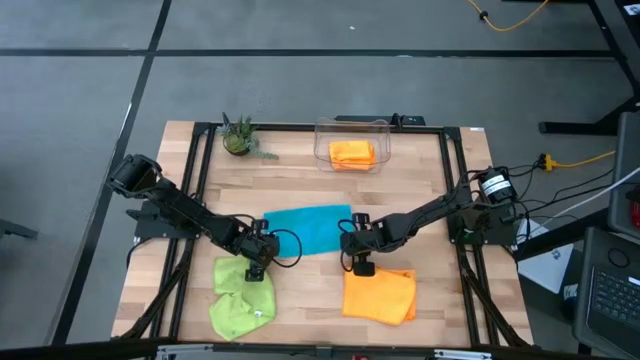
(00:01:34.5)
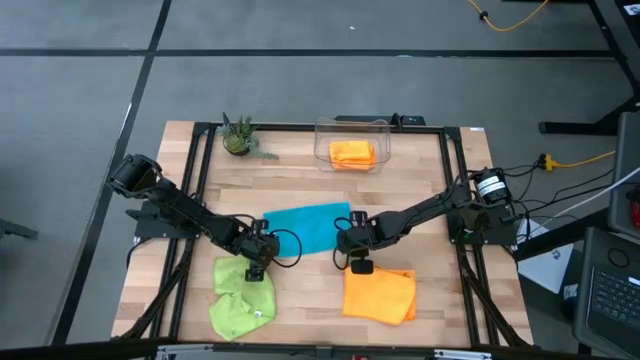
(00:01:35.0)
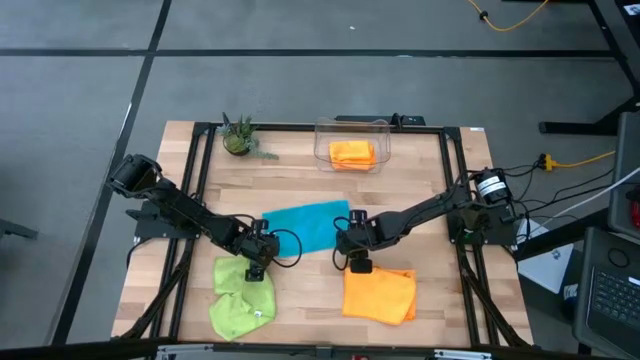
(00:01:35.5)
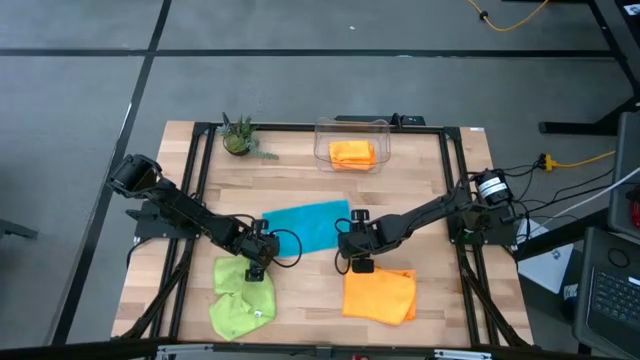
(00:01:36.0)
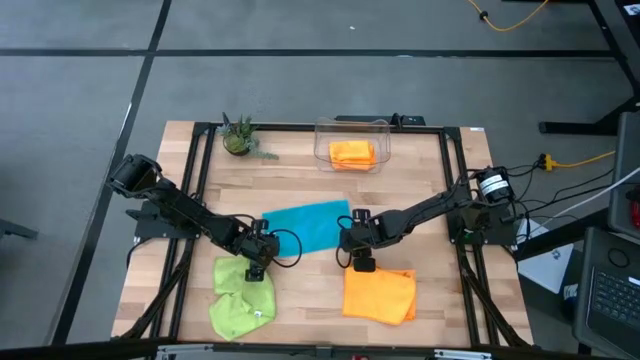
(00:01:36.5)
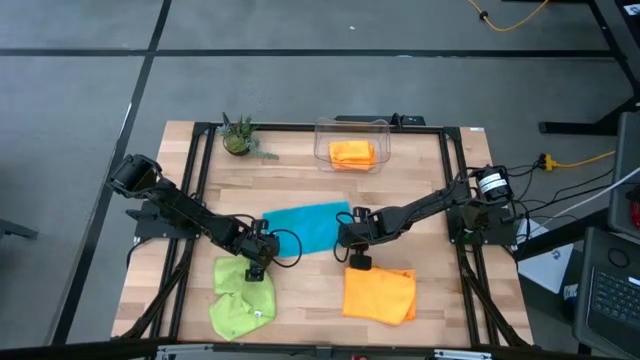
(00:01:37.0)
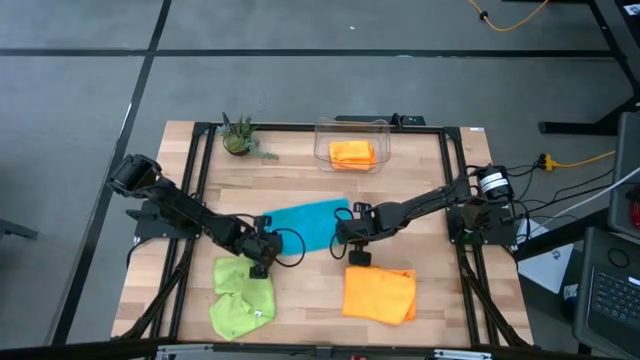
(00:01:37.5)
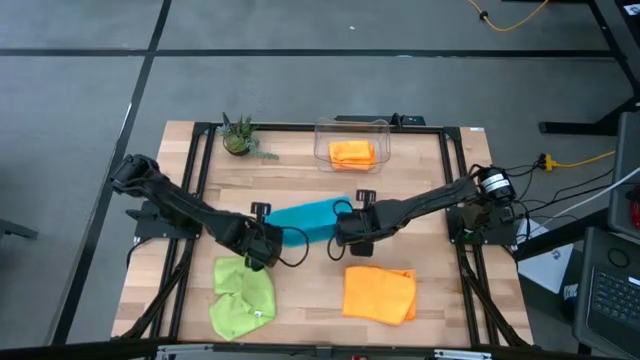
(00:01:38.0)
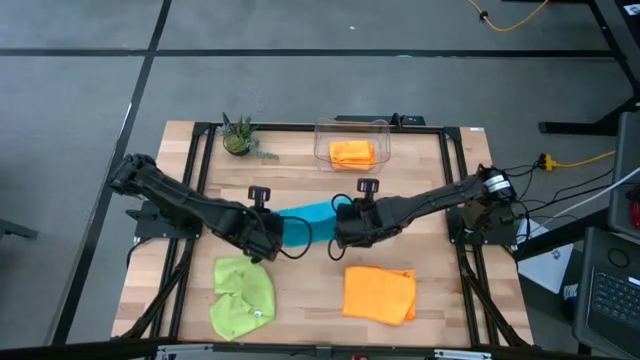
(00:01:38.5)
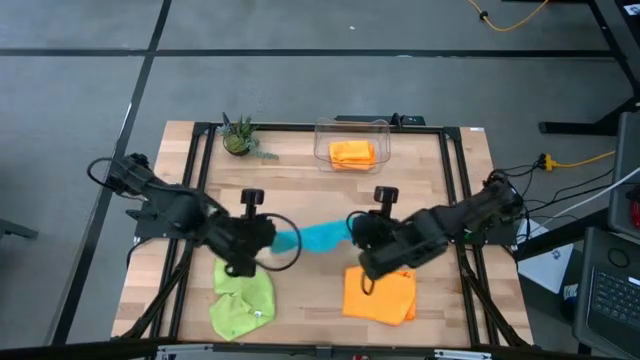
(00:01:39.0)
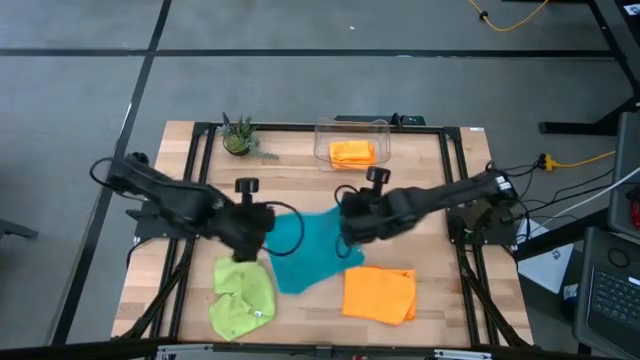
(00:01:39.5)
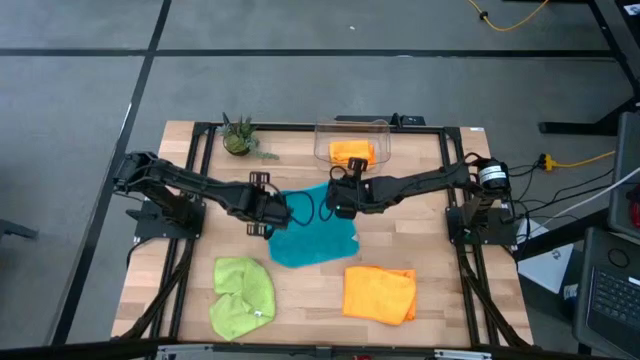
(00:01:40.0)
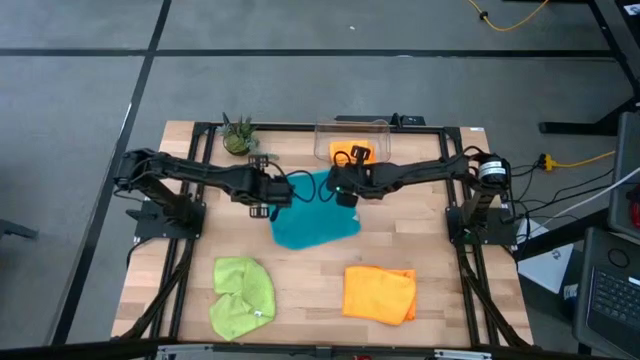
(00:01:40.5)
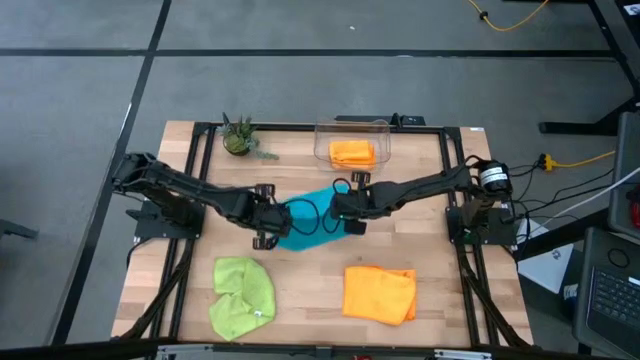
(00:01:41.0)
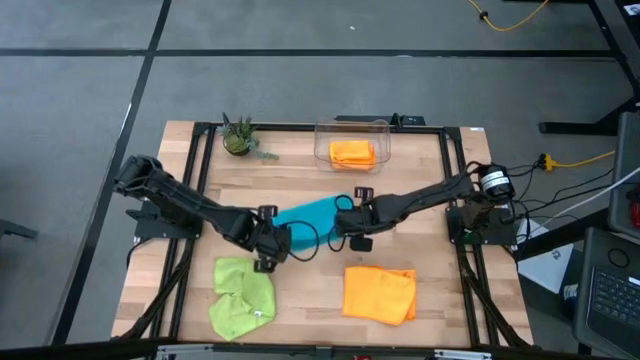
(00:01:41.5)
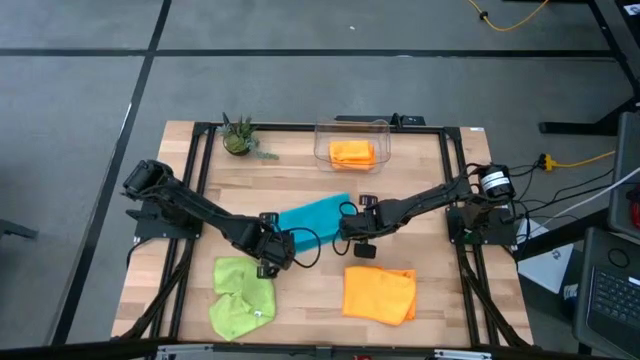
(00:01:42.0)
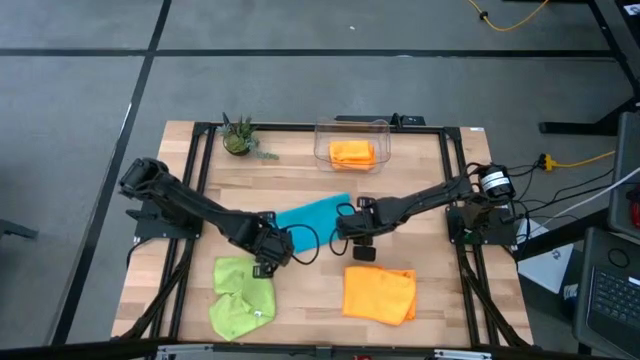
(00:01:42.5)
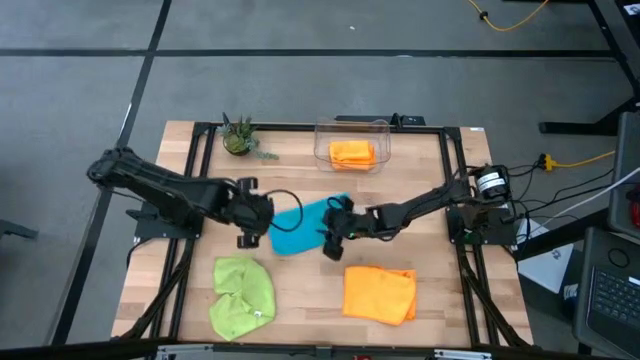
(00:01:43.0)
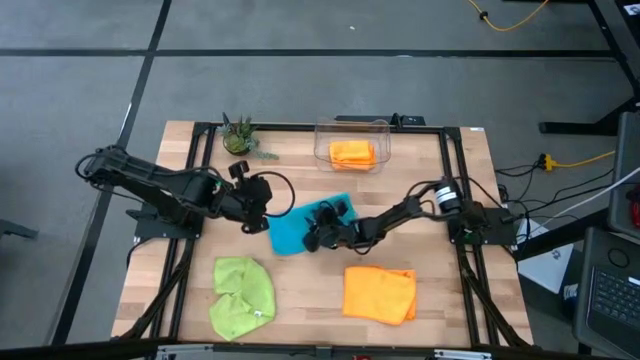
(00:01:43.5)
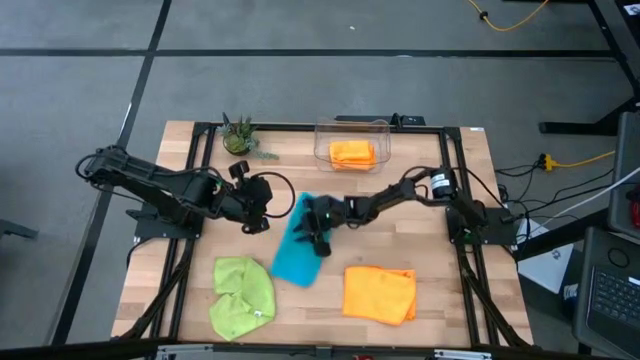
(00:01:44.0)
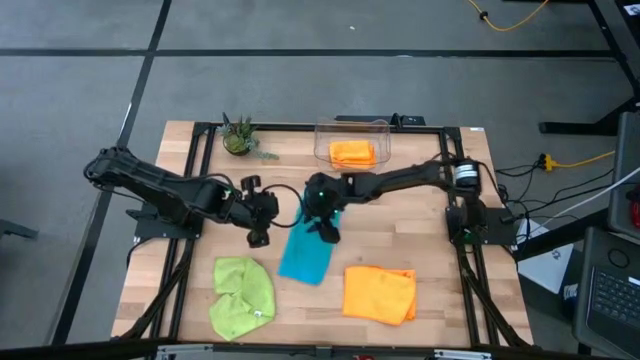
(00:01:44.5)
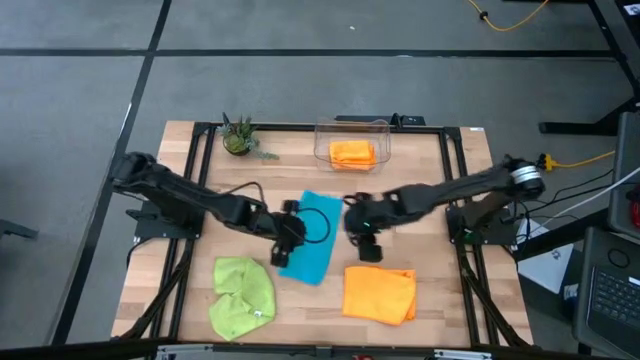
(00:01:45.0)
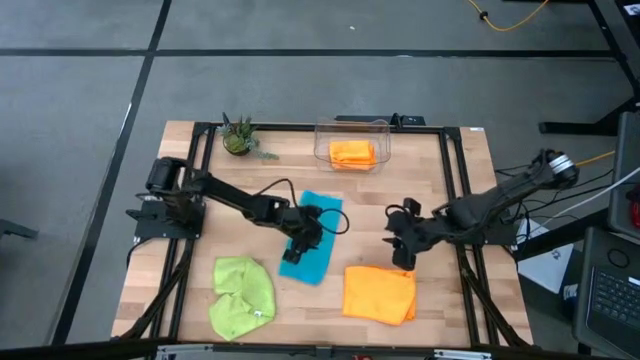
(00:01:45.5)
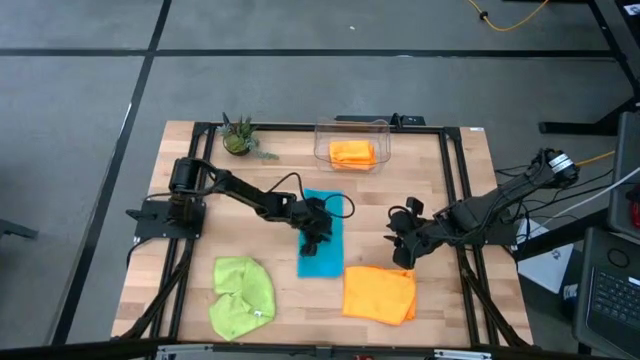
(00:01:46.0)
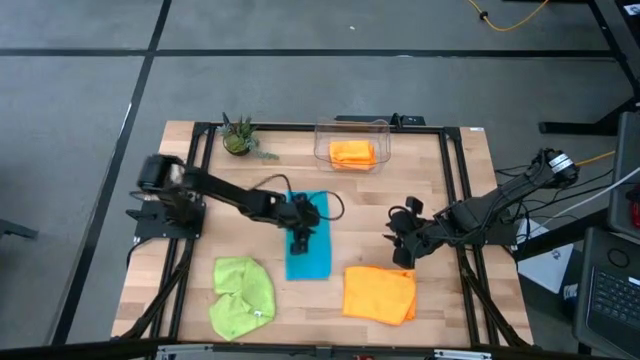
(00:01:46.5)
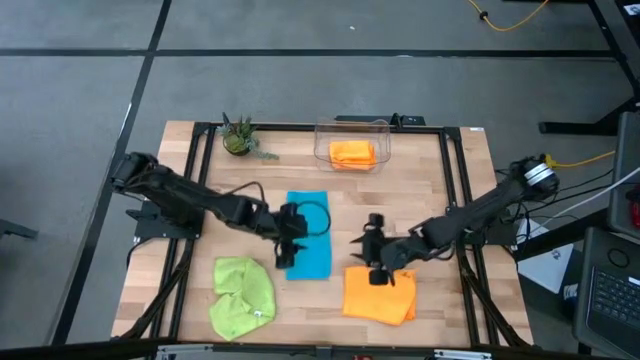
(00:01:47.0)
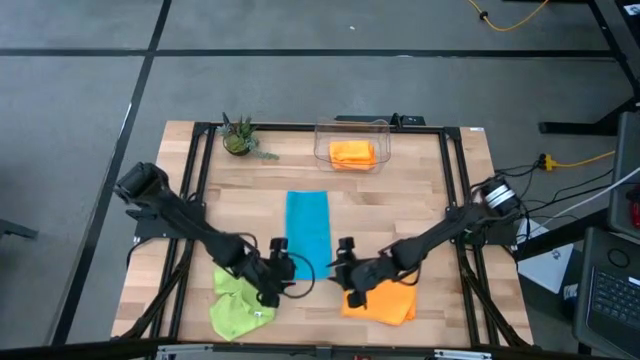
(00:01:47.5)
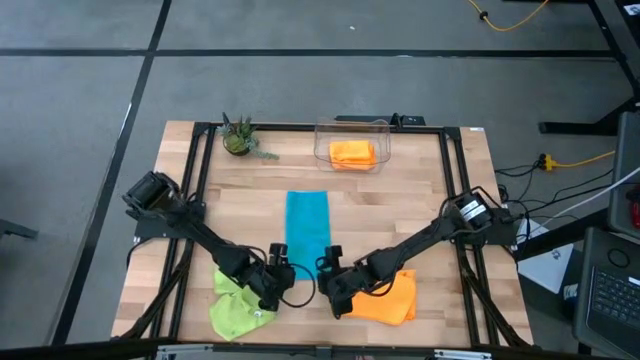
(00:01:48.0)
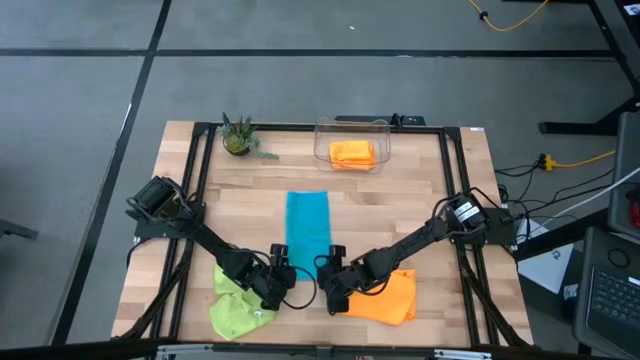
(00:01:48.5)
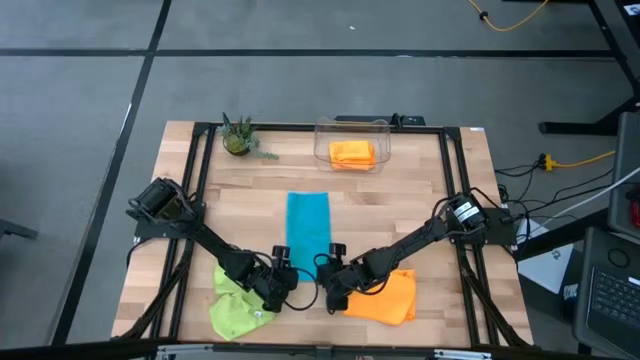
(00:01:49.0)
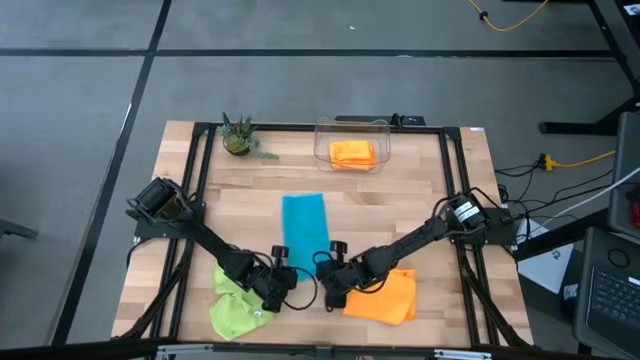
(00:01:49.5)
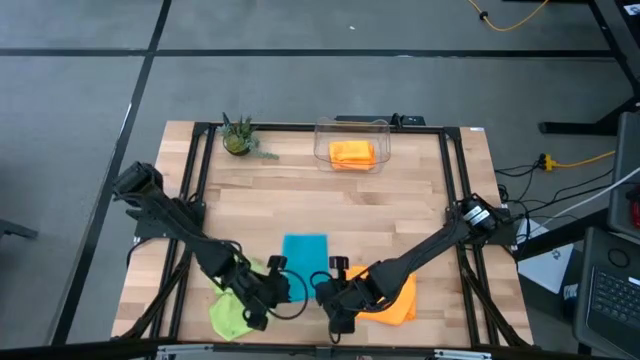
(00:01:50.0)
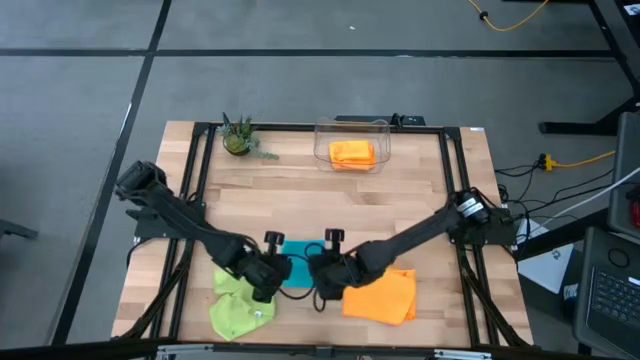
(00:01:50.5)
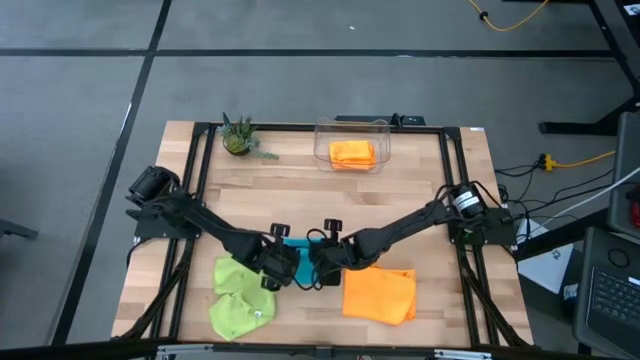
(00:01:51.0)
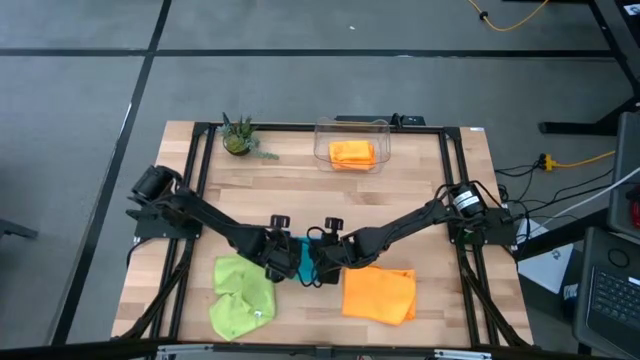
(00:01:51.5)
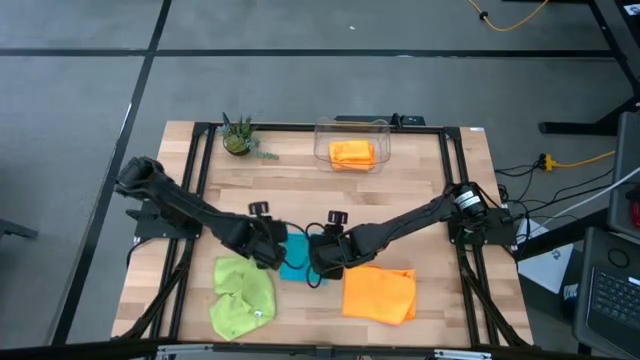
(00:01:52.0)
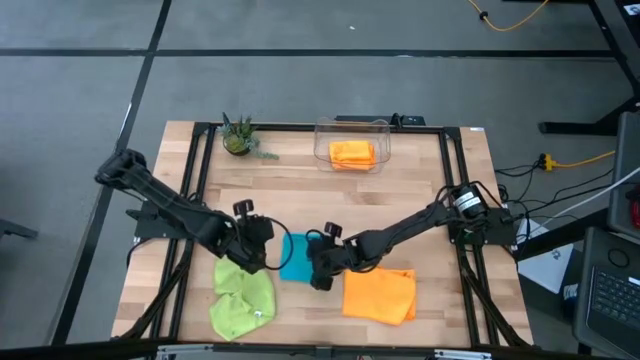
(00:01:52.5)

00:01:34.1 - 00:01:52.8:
Task: Fold microfiber towels
Fold the blue towel on the table

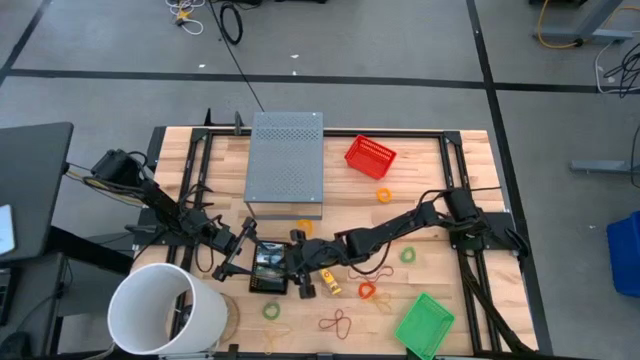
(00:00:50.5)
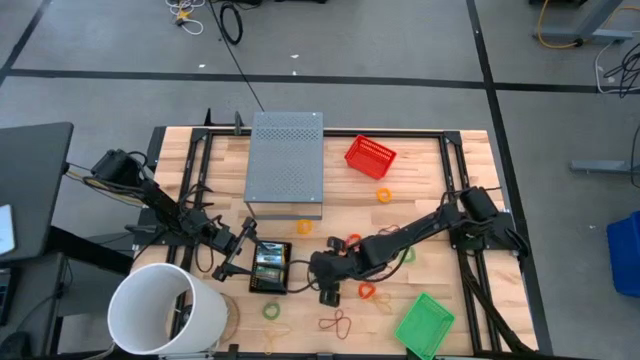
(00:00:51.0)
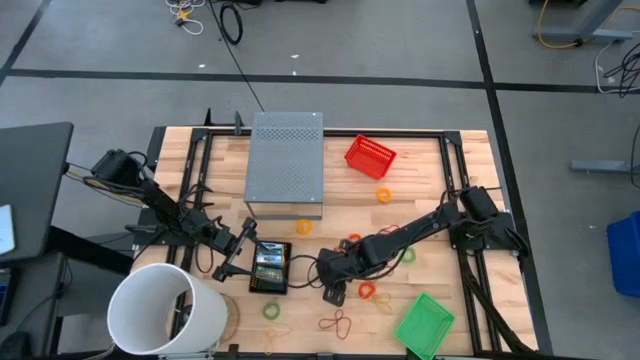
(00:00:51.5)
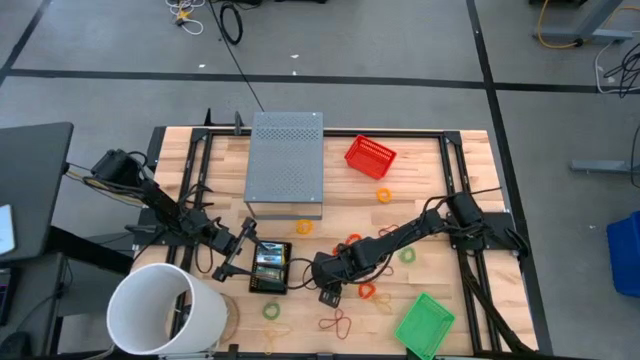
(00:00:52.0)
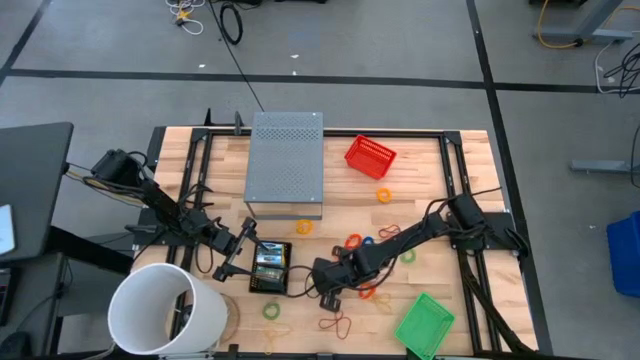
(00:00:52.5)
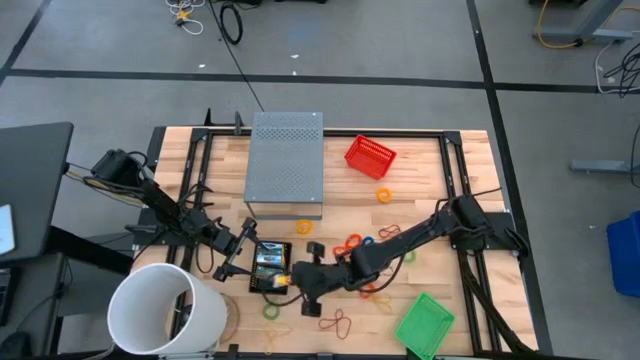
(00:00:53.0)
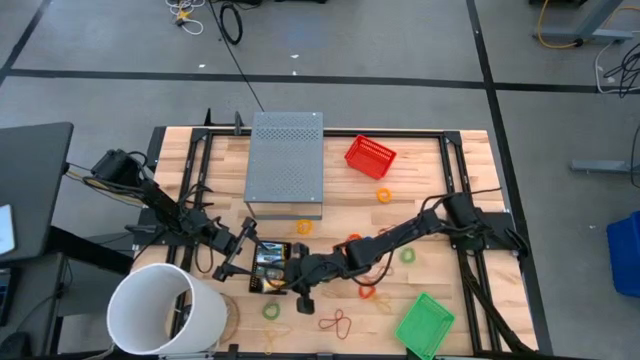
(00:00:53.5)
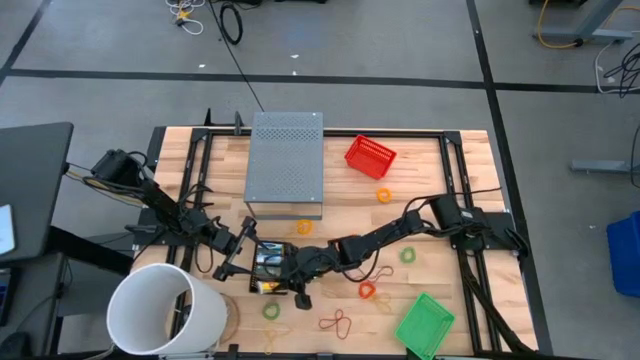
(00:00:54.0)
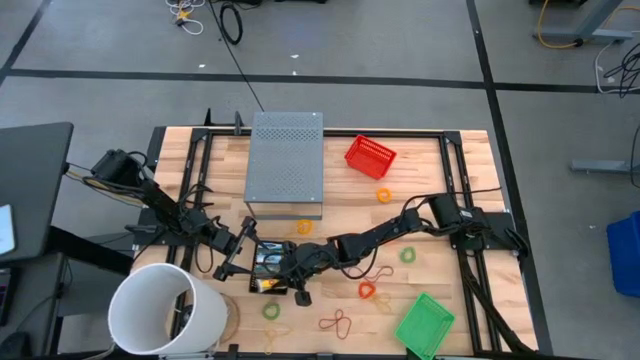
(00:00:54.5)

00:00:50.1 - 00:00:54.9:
Task: Pick & Place Office Desk Supplies
Put the crayon box into the black basket
